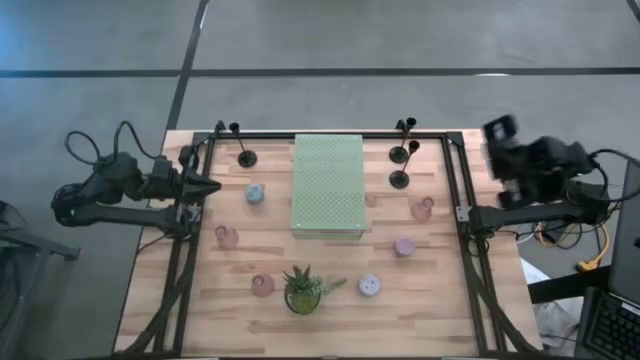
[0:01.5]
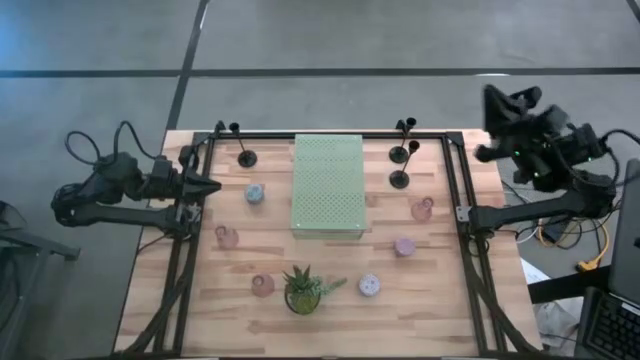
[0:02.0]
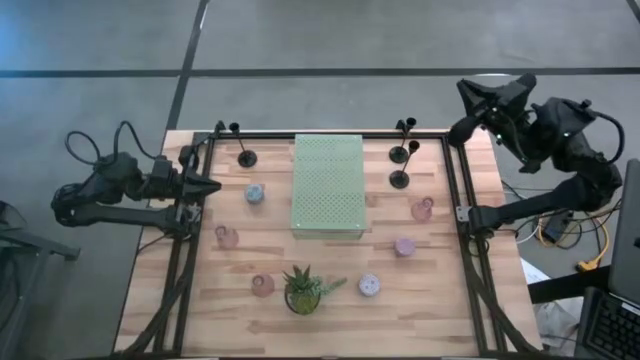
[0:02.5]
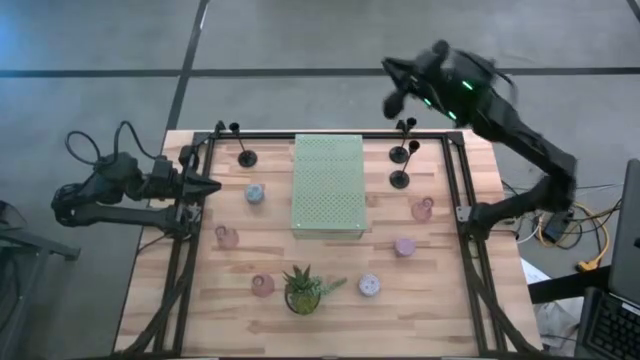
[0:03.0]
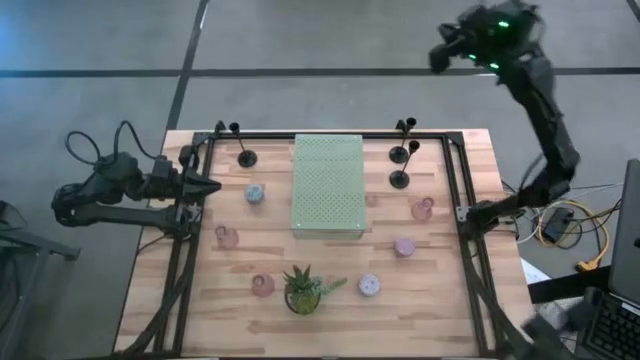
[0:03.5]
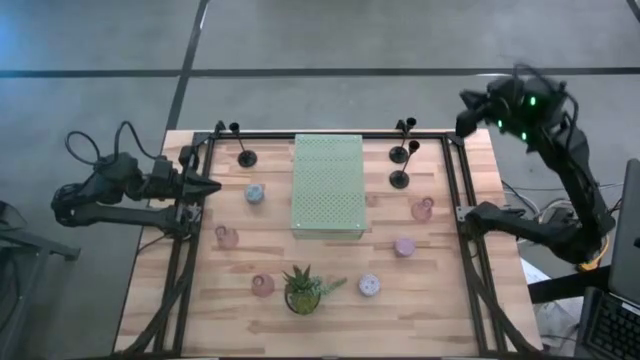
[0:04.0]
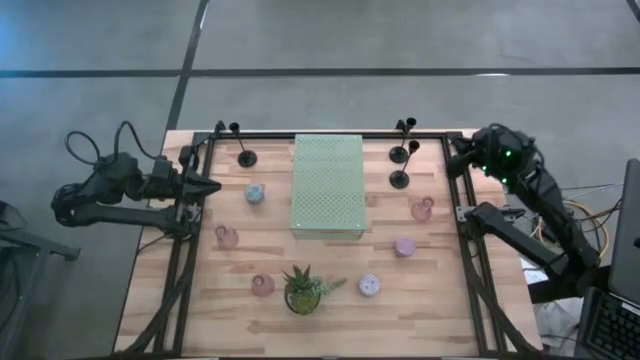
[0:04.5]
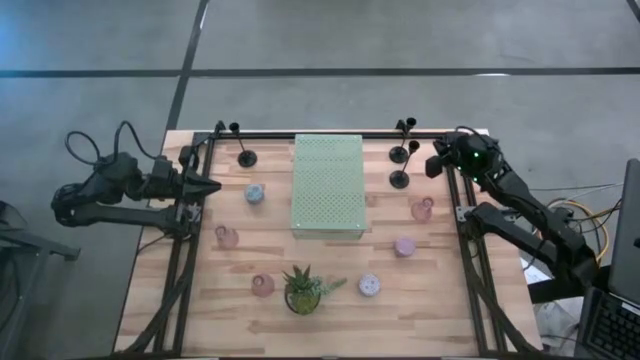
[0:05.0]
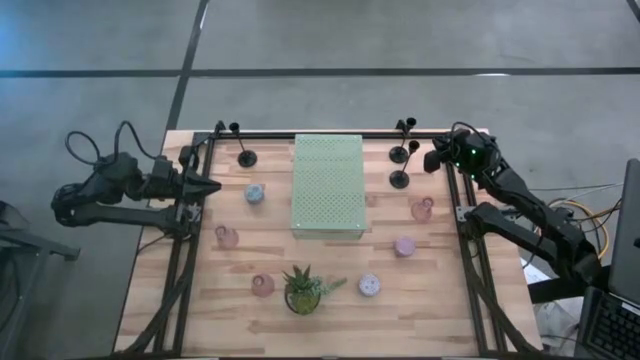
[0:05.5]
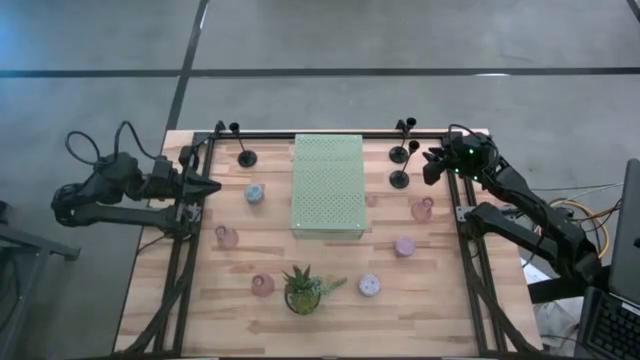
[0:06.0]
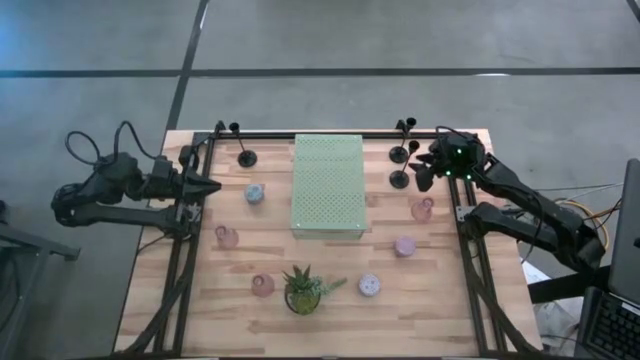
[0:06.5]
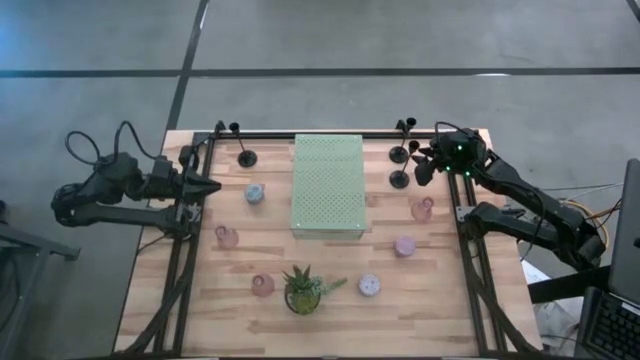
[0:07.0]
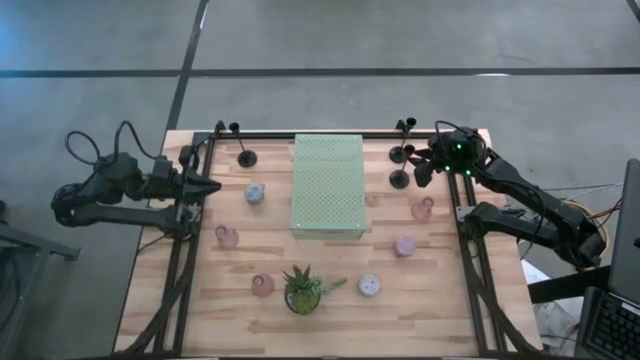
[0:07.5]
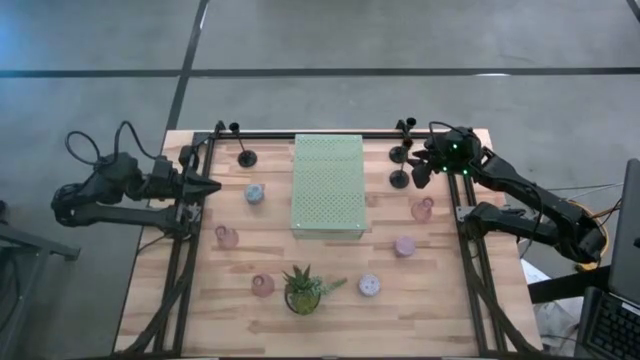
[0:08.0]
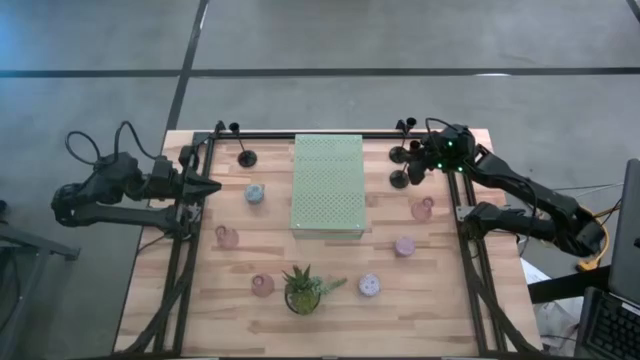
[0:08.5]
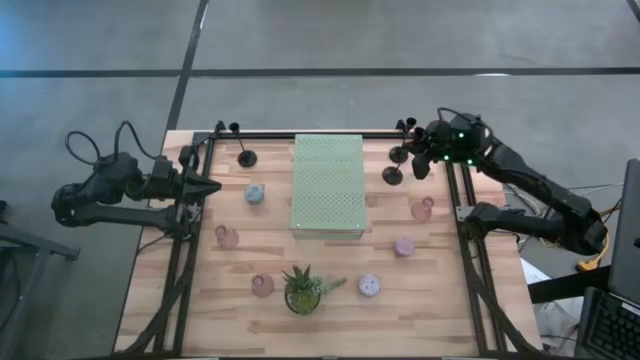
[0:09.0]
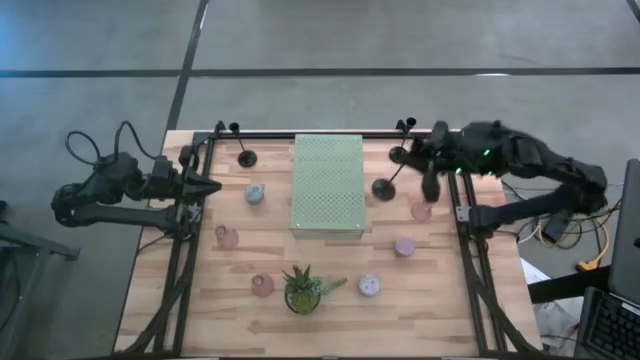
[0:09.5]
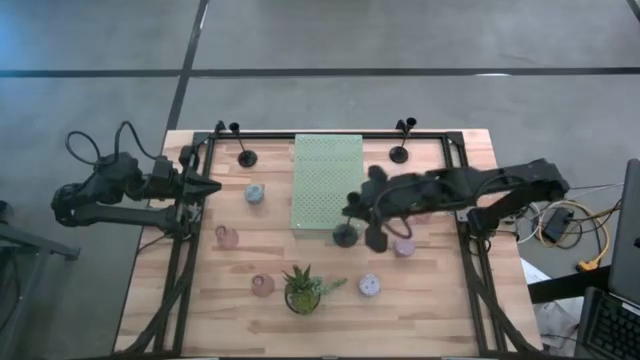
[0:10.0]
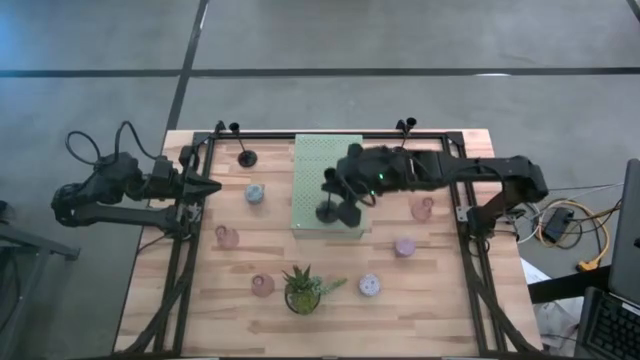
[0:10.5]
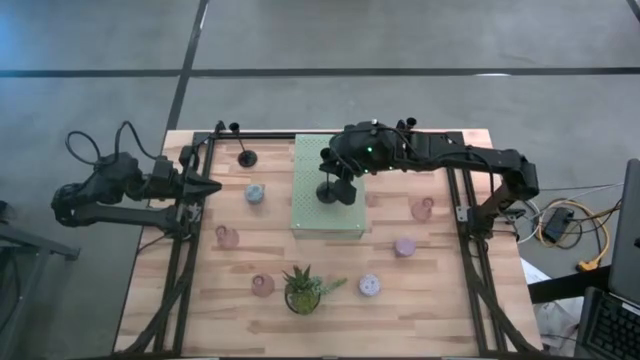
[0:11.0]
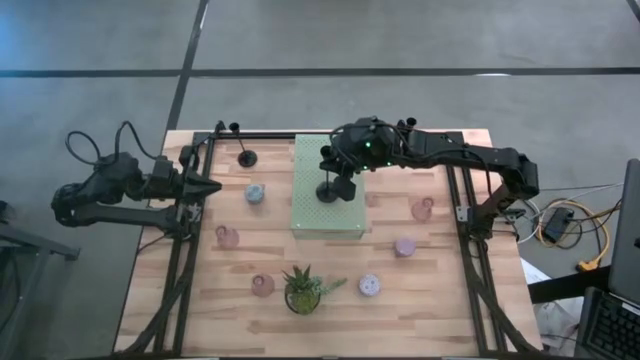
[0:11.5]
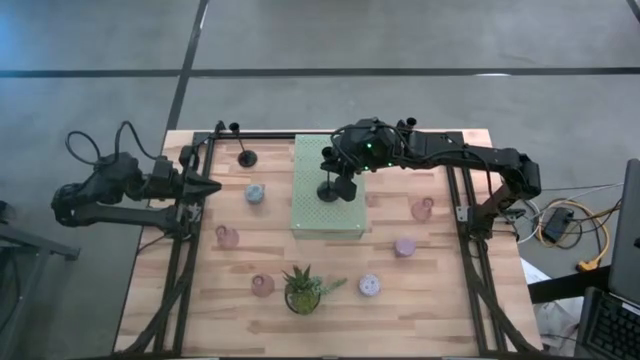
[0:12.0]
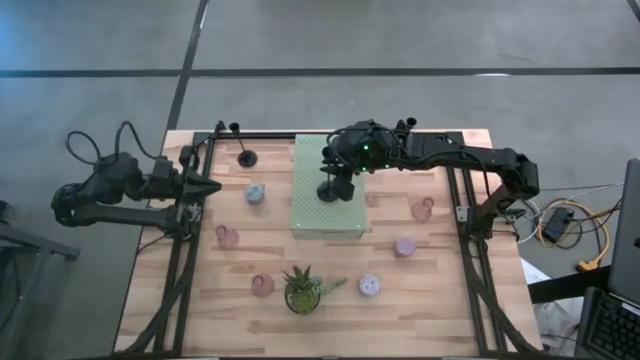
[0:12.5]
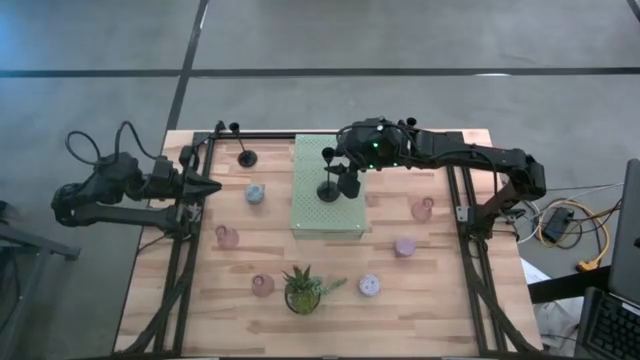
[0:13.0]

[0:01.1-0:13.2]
Task: Pick & Place candle stick holders
Put the bottom black candle holder on the shelf

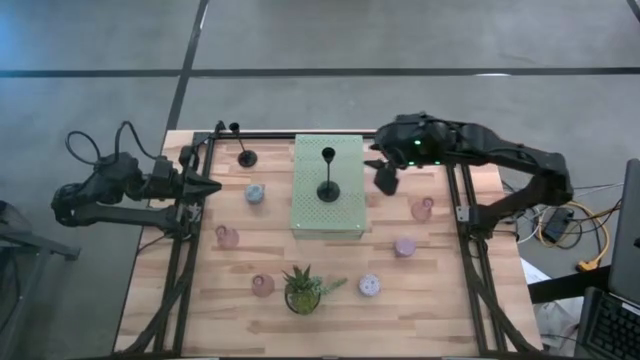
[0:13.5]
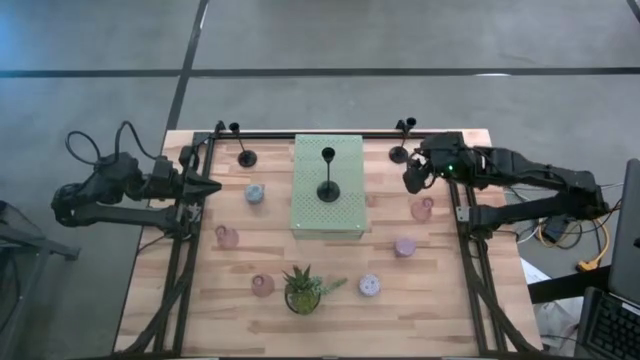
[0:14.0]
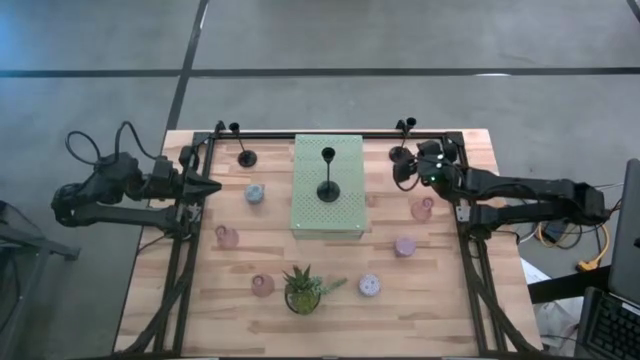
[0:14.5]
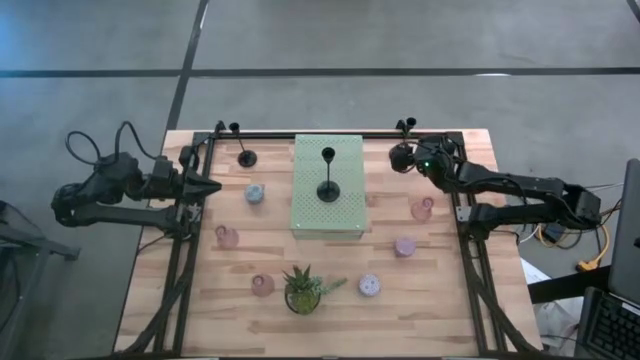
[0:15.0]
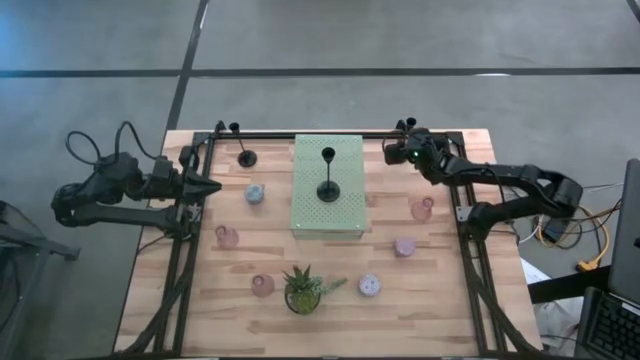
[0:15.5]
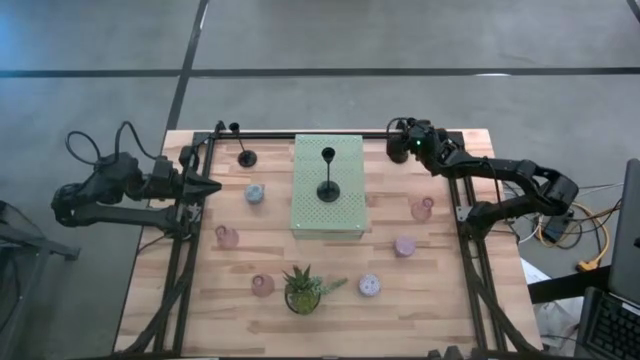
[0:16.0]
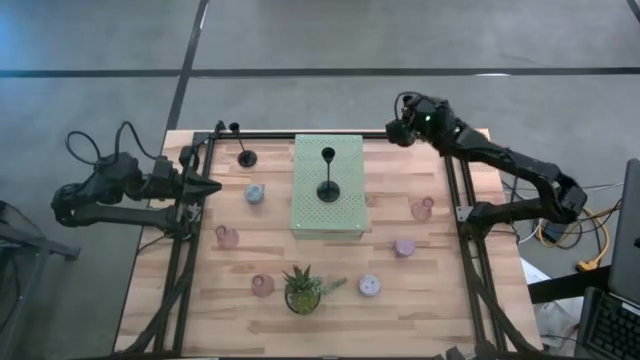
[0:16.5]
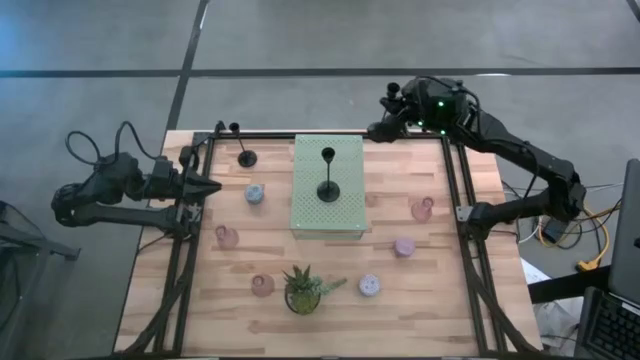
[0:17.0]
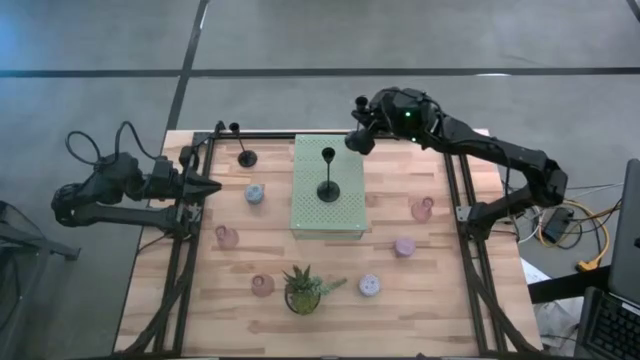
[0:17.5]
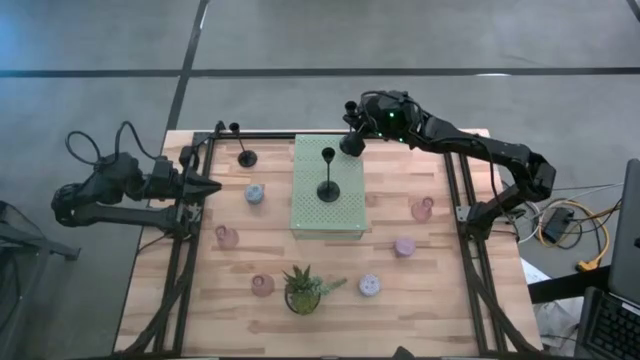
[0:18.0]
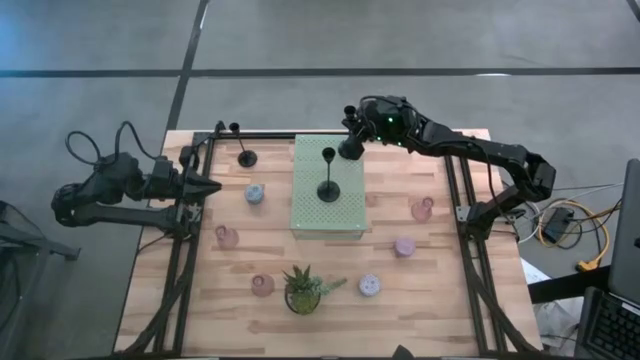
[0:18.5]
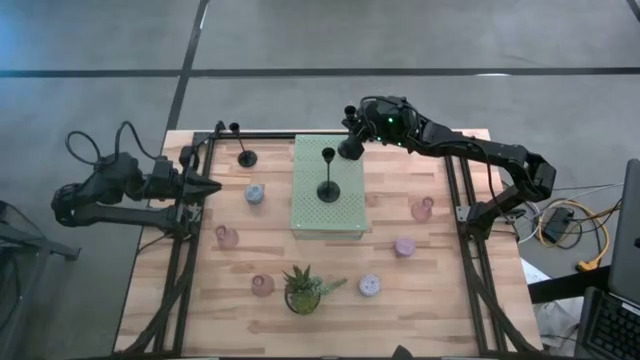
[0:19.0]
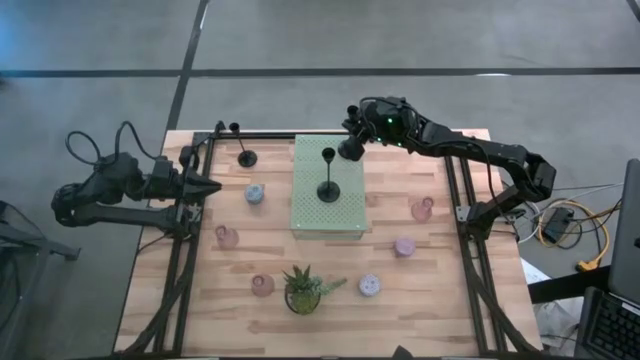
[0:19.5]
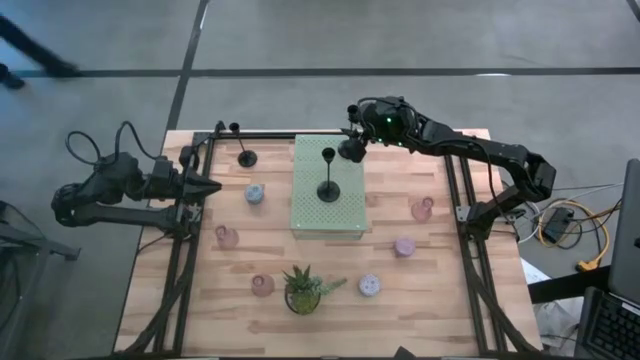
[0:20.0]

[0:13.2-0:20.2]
Put the right black candle holder on the shelf

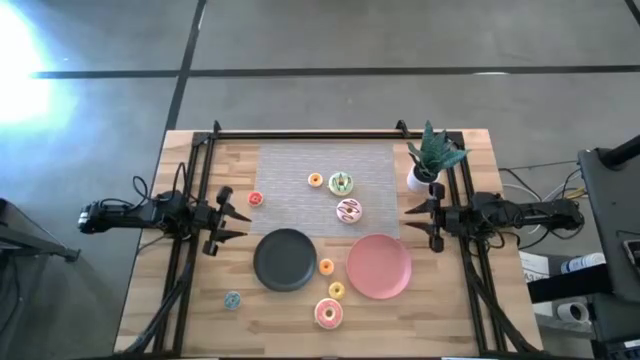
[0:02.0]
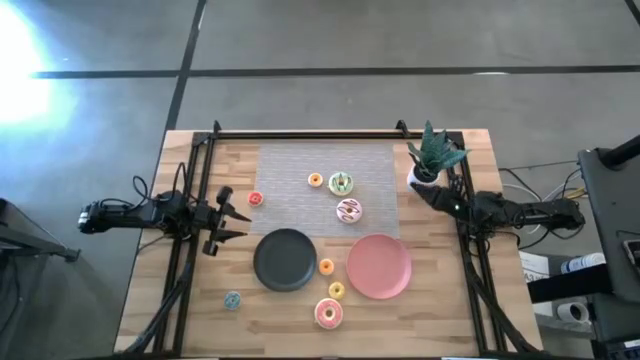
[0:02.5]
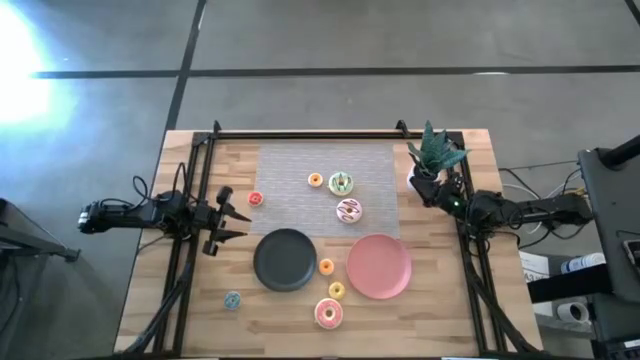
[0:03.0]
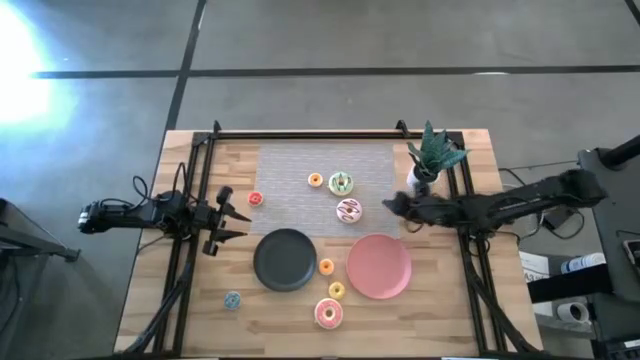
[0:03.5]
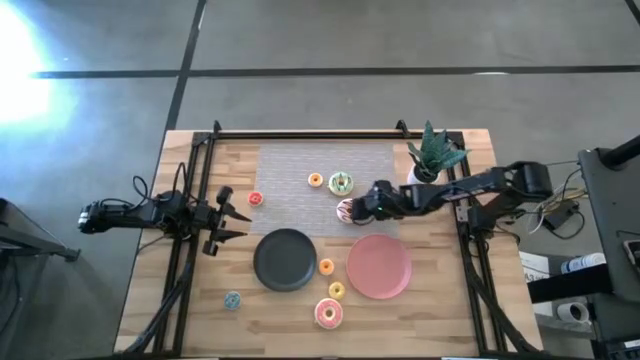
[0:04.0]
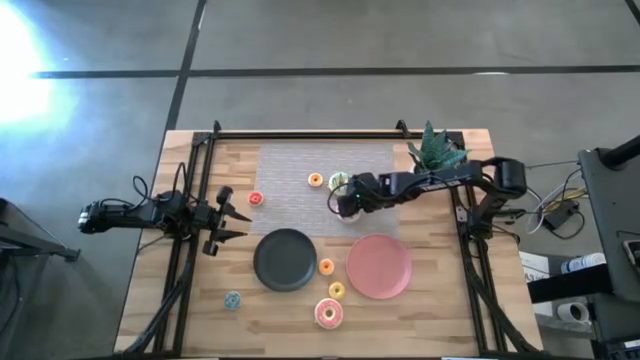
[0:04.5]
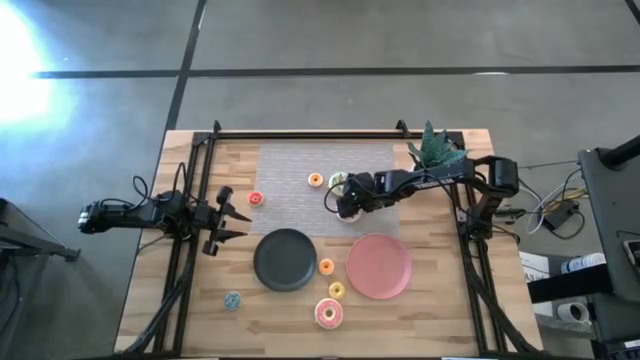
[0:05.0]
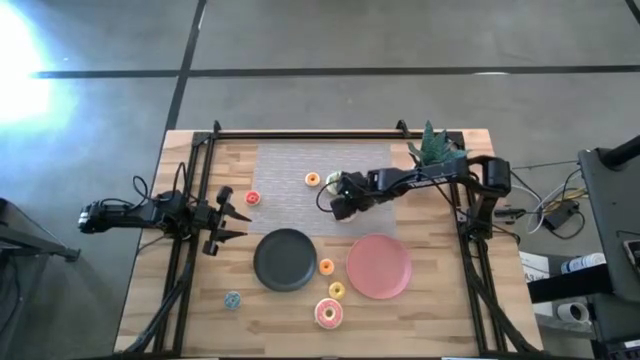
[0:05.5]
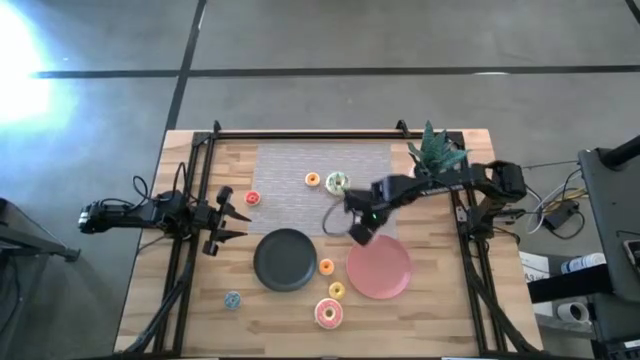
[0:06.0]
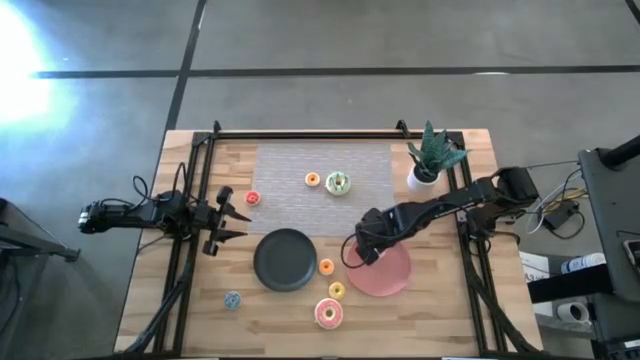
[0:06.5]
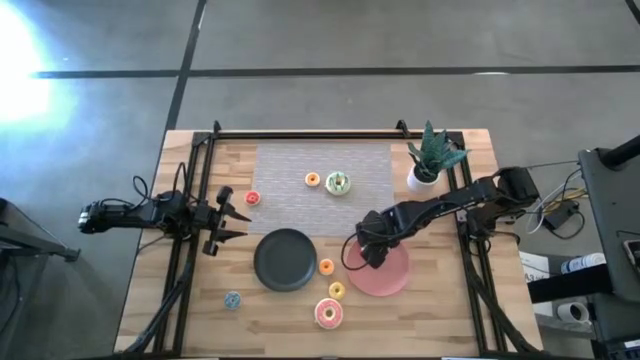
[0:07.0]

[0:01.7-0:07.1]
Task: Pick & Place donuts
Put the large purple donut on the pink plate
